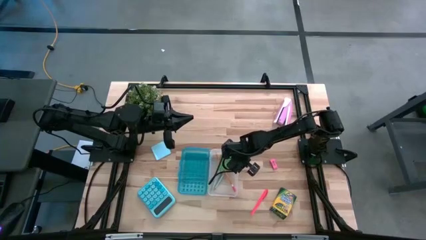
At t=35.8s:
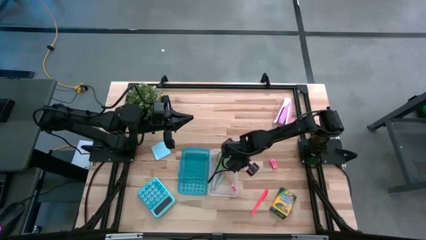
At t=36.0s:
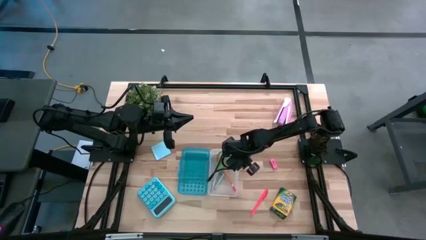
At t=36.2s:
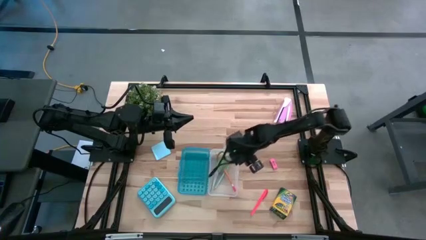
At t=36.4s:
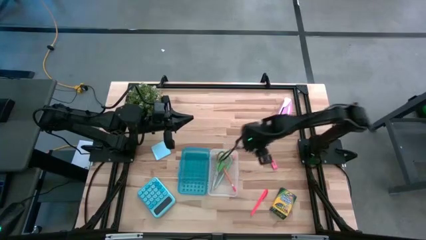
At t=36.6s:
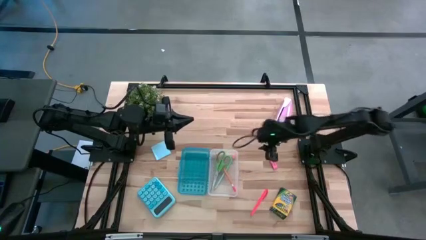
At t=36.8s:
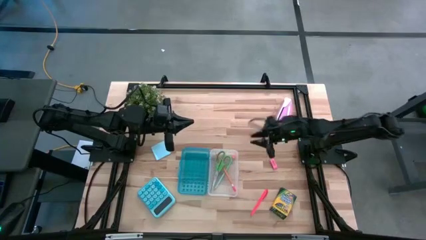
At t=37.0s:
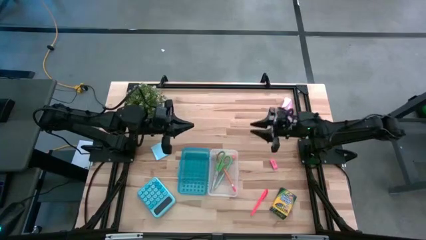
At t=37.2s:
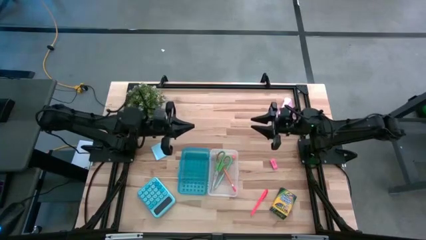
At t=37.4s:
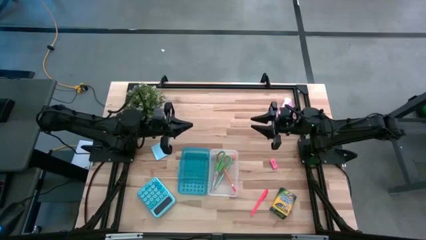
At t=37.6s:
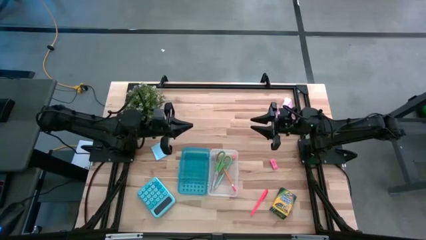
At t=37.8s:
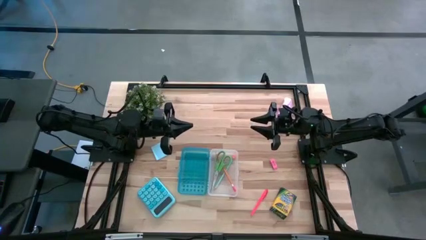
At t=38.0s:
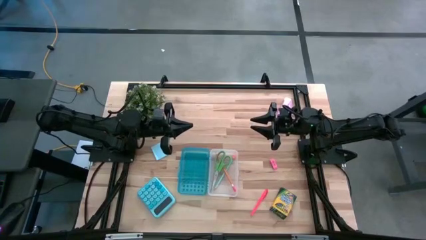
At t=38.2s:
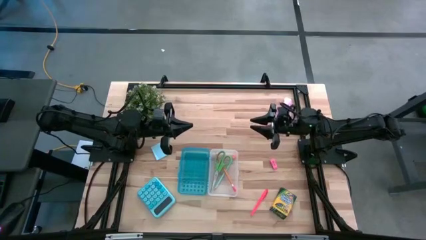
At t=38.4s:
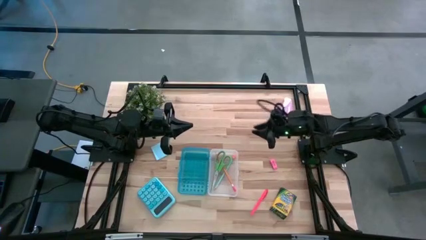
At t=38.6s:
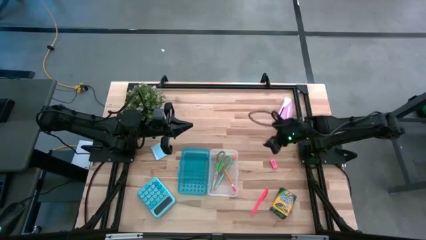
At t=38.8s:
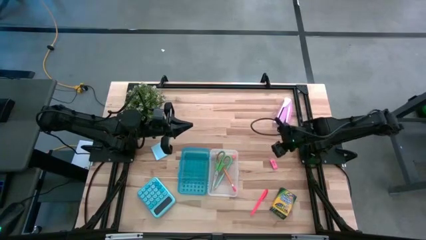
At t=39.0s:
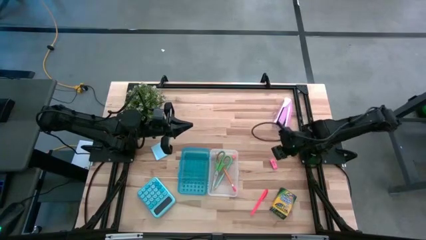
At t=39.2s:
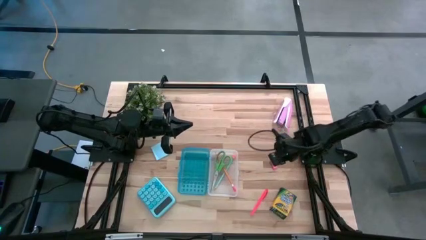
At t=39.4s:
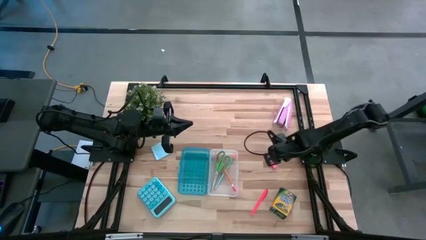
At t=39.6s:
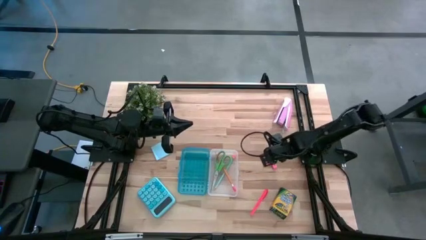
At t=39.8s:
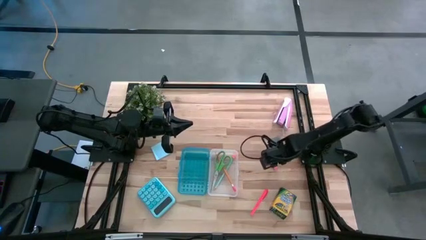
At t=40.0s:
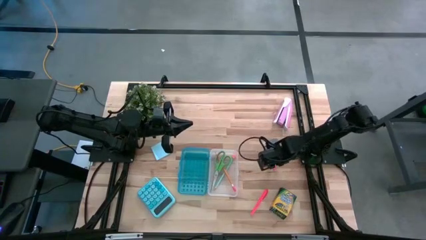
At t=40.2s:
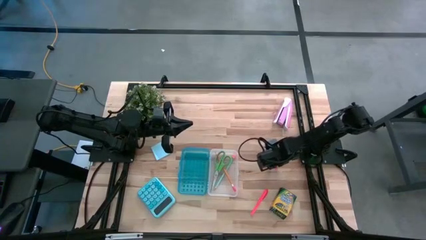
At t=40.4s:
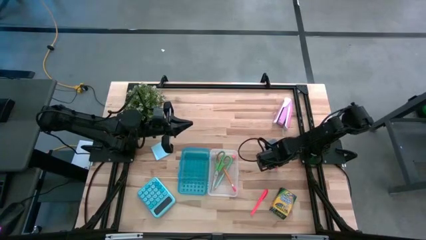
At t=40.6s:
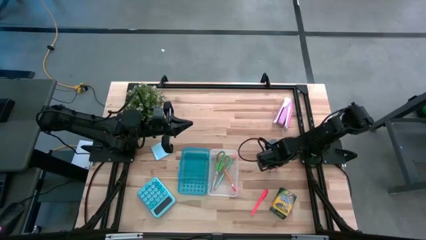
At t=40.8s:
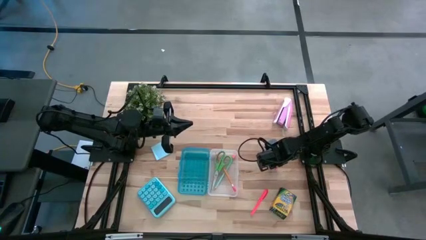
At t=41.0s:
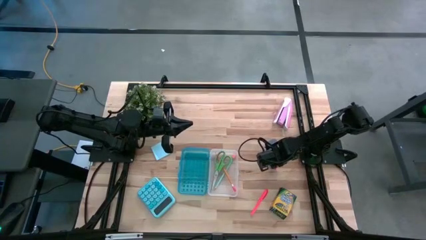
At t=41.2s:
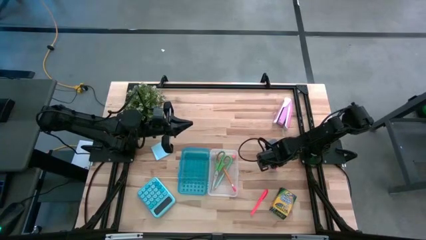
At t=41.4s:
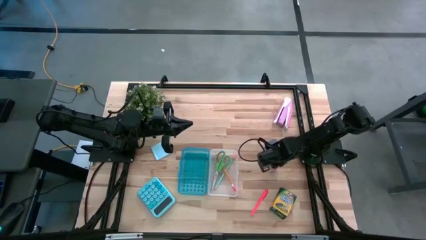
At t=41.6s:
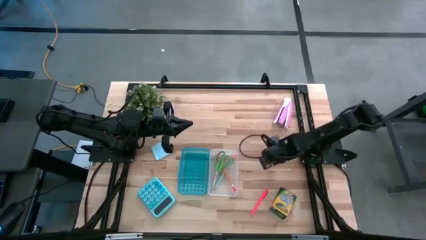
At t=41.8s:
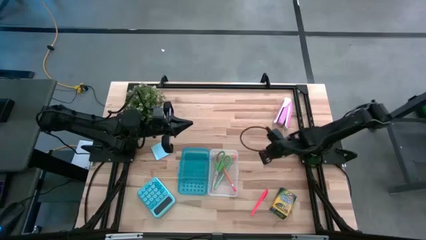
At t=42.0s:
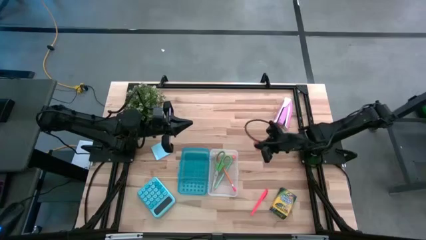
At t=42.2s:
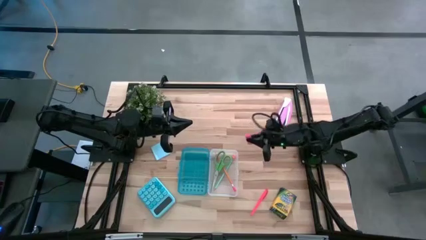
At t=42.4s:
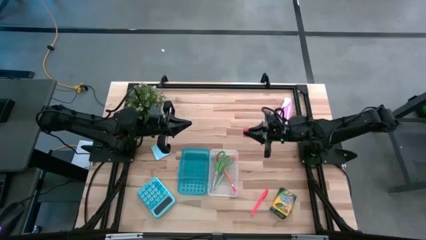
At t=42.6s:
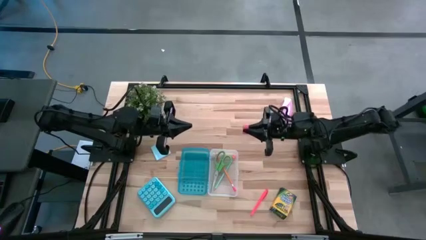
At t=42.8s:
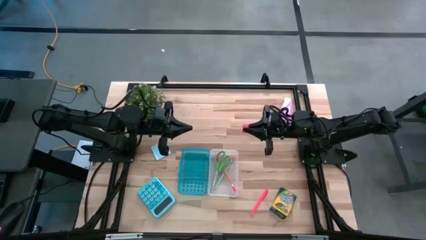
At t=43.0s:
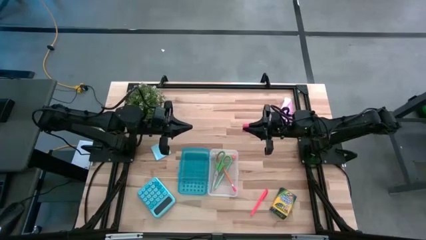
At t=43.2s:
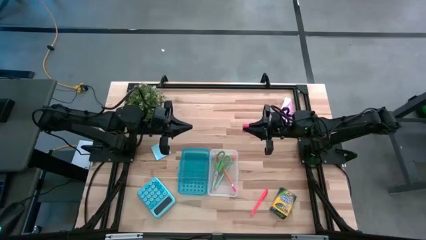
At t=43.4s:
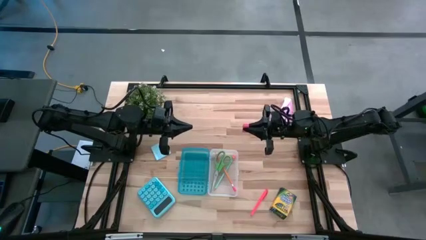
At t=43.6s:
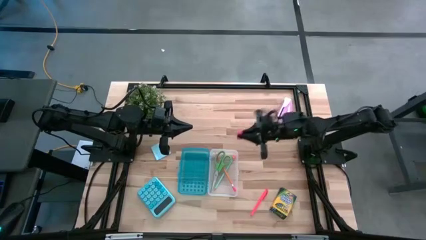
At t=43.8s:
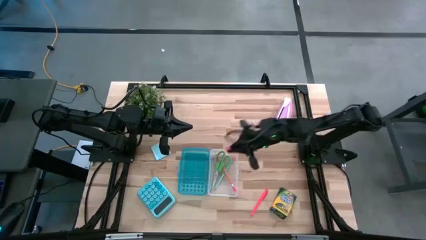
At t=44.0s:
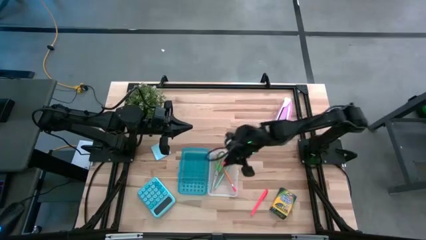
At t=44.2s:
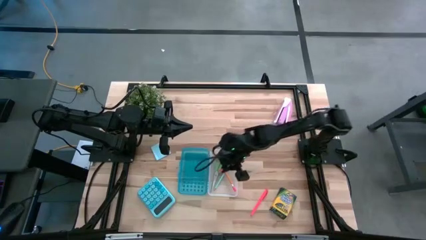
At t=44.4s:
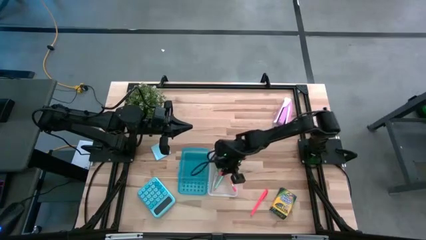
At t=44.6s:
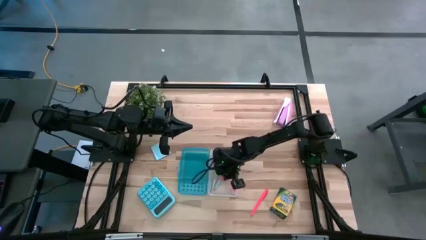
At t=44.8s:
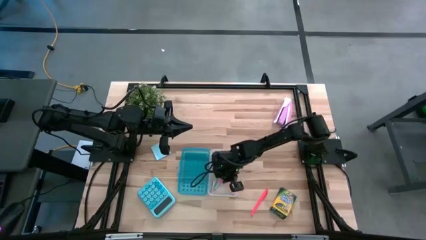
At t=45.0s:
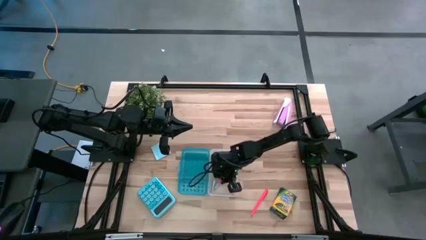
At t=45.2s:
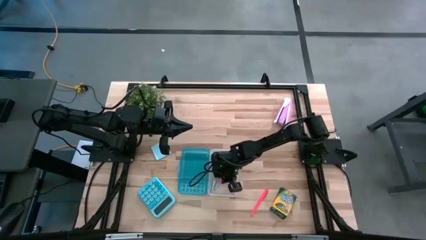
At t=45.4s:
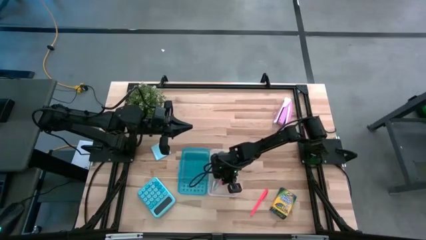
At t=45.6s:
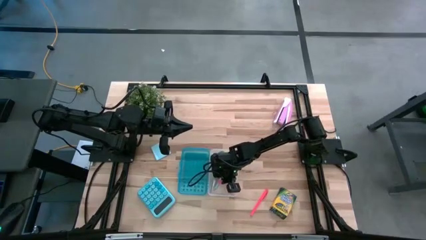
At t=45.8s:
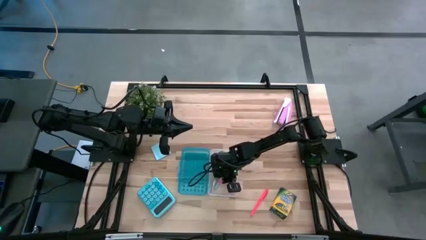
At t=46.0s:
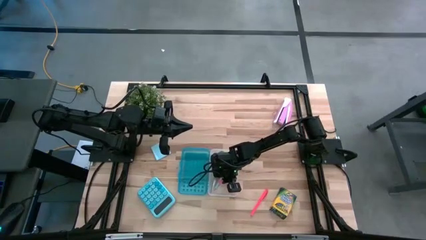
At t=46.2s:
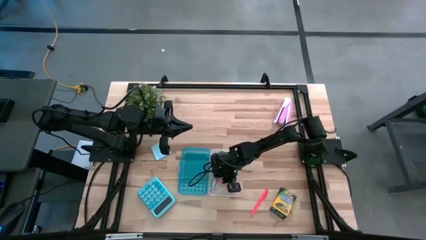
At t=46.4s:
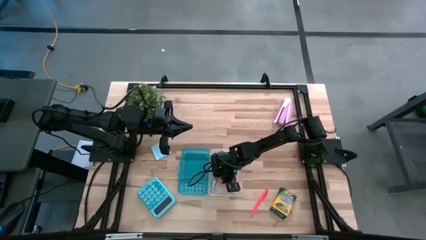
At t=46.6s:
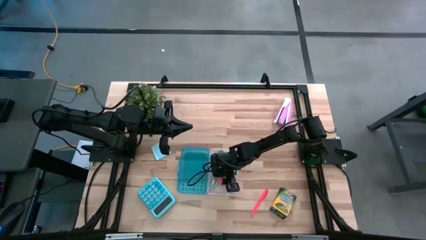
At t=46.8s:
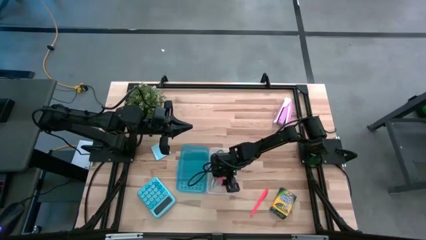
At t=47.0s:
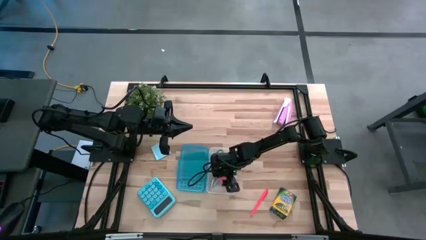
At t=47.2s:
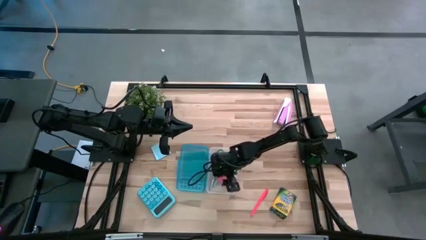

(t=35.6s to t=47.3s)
Task: Pack school essentials
Put the pink eraser into the blue supply box

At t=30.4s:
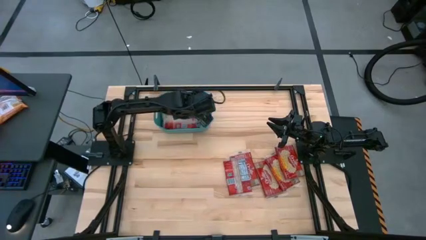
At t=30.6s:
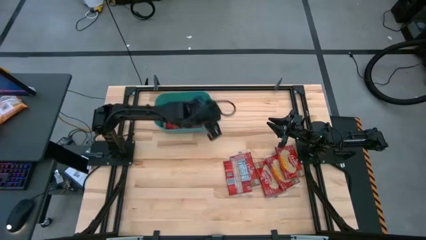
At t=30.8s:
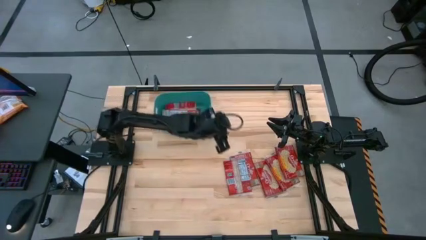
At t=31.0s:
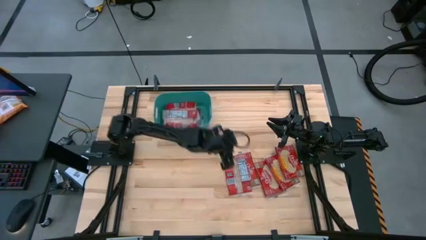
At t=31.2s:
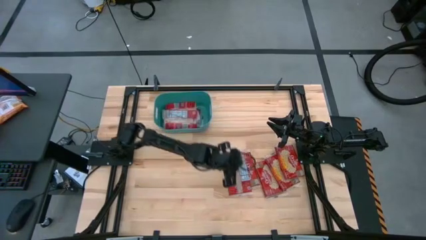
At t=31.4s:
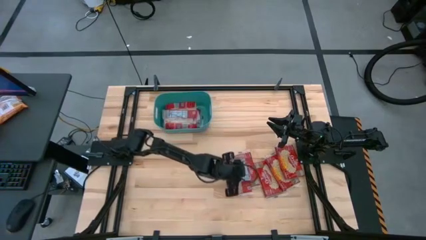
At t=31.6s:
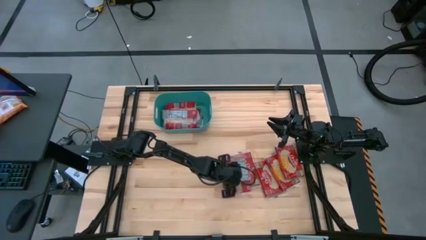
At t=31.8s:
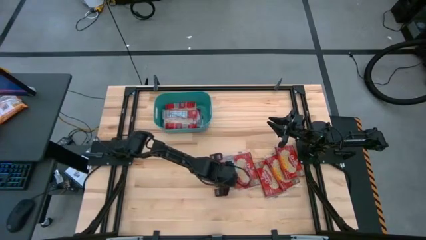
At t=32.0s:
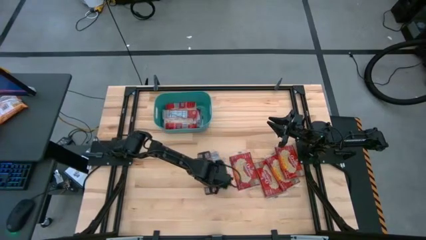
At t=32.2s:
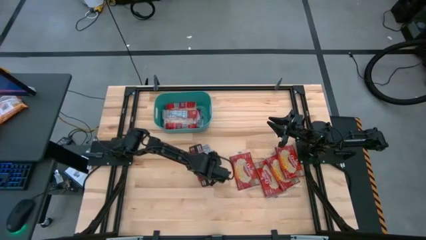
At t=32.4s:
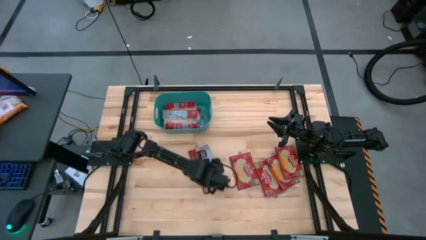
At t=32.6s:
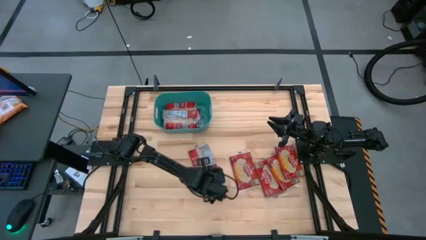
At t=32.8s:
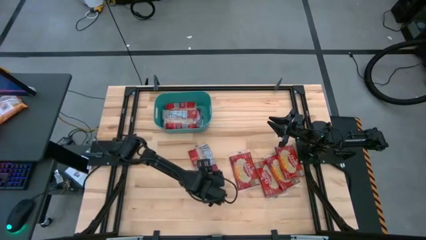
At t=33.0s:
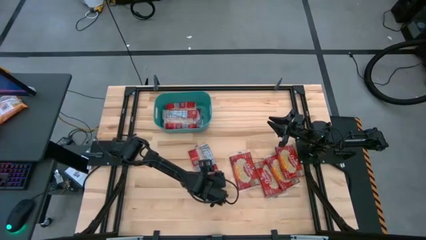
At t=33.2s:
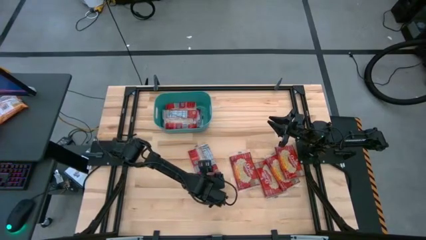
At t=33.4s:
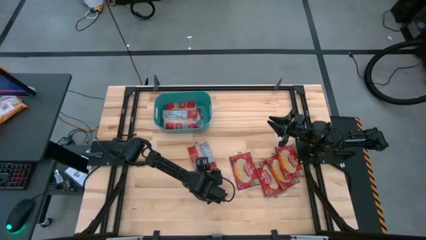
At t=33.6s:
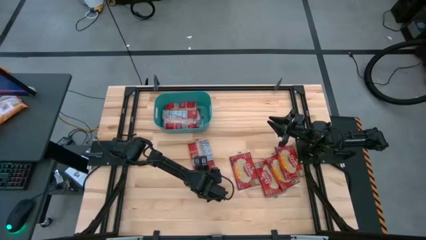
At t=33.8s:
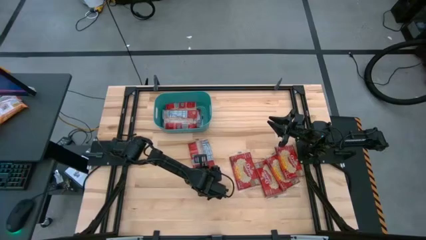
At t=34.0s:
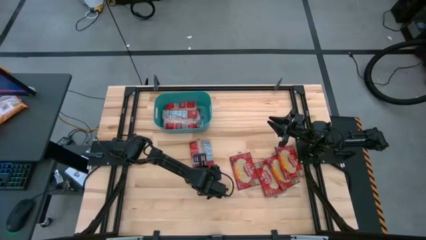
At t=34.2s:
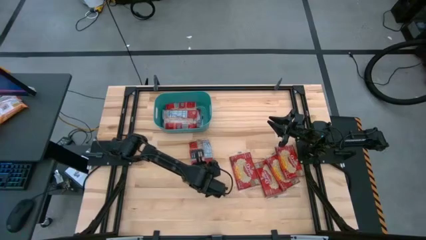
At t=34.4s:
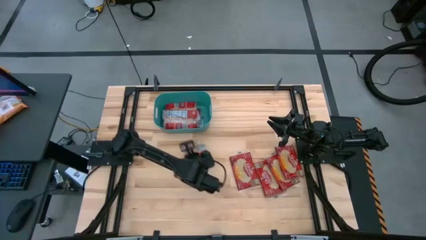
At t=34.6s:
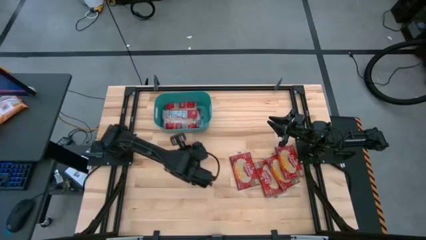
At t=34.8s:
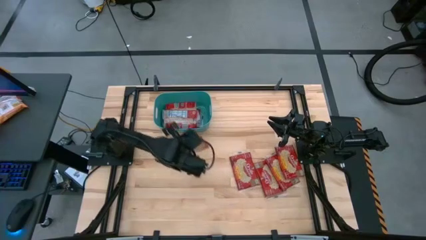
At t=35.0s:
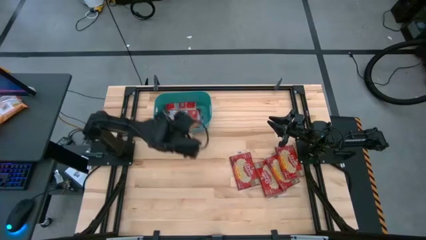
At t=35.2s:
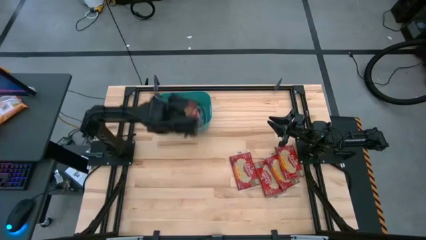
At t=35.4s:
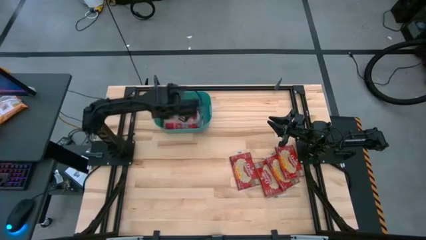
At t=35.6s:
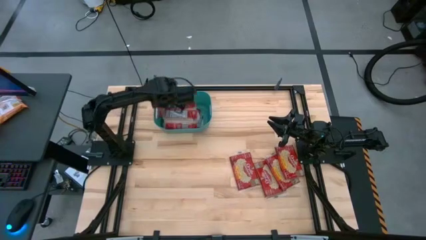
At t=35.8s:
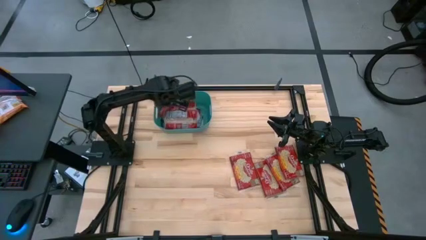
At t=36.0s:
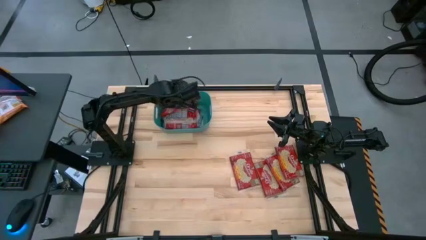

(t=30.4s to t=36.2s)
Task: Sort popcorn bags into baskets
Put the popcorn bag into the green bin
